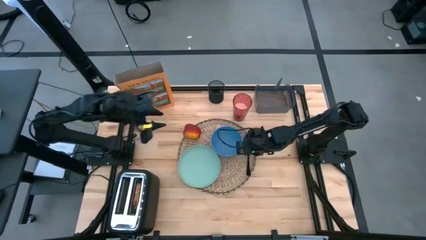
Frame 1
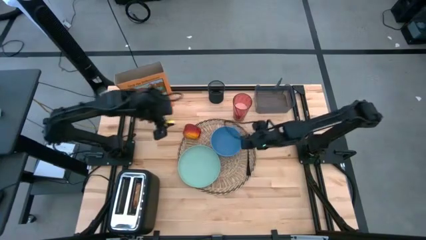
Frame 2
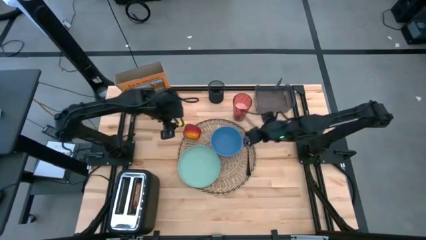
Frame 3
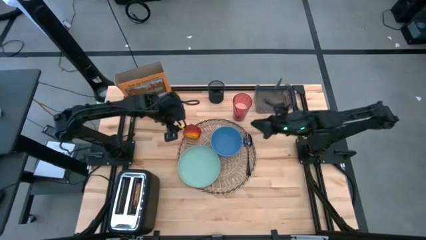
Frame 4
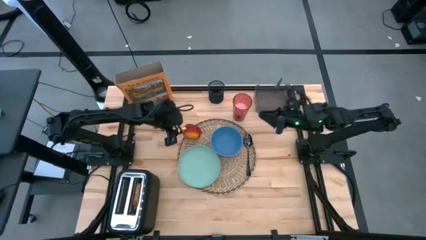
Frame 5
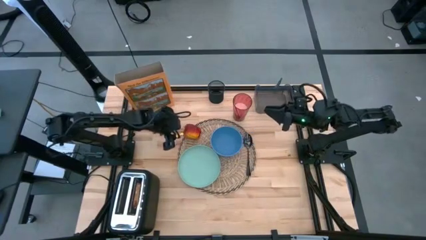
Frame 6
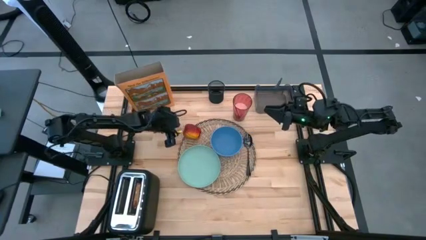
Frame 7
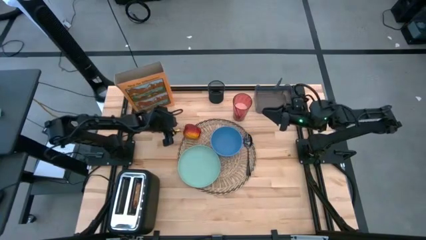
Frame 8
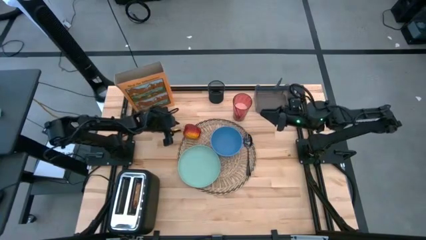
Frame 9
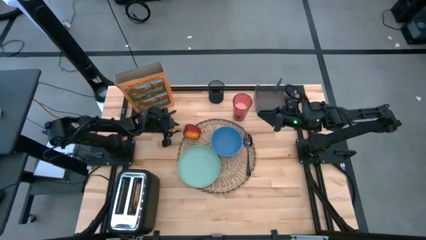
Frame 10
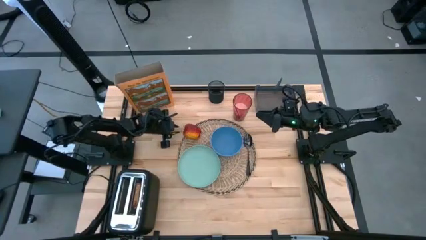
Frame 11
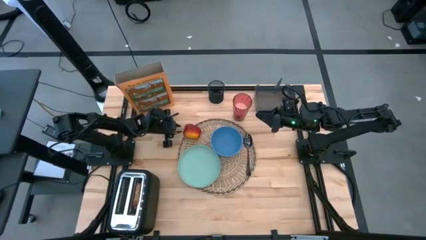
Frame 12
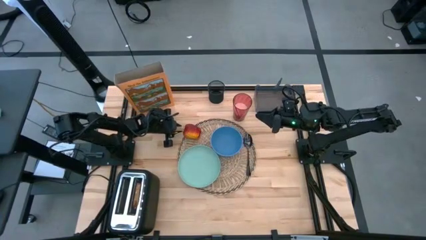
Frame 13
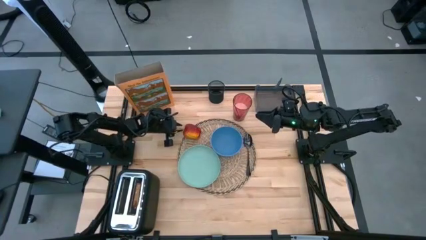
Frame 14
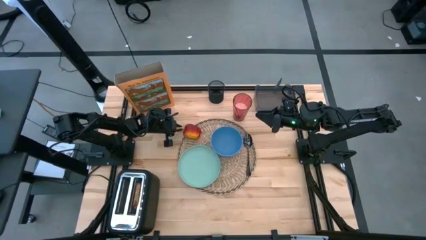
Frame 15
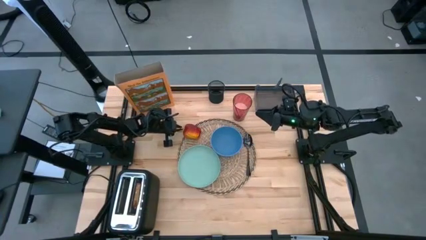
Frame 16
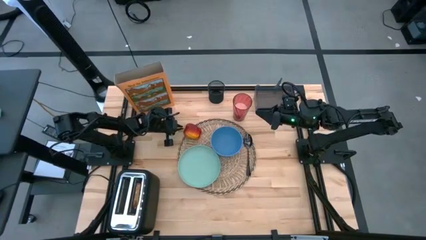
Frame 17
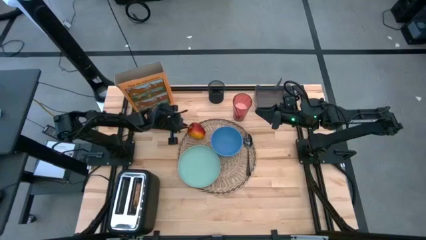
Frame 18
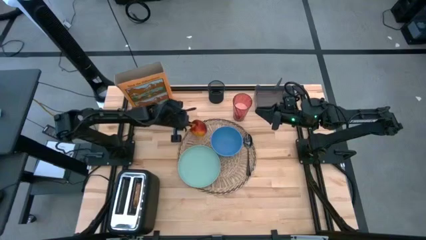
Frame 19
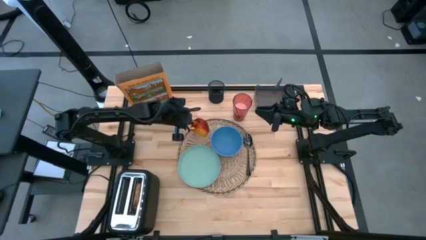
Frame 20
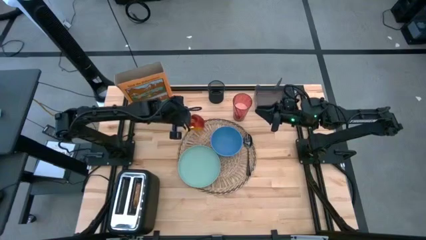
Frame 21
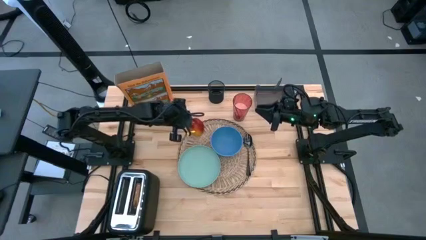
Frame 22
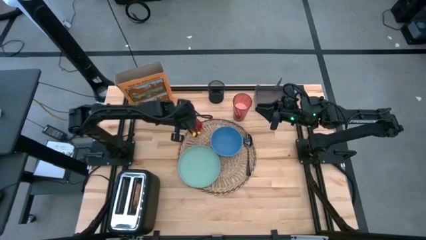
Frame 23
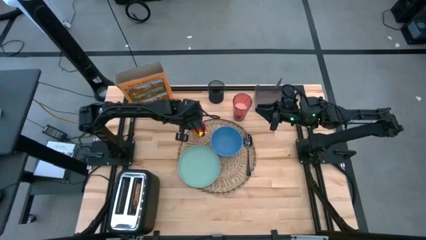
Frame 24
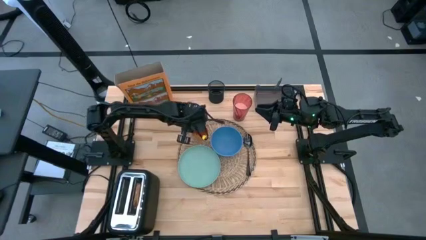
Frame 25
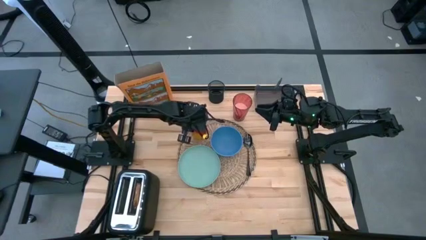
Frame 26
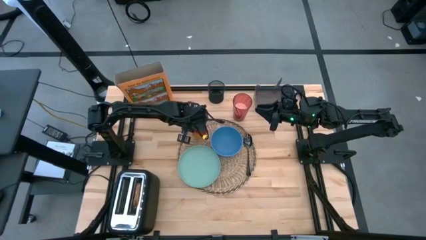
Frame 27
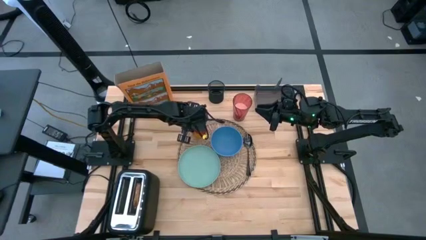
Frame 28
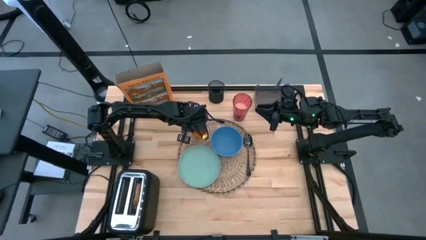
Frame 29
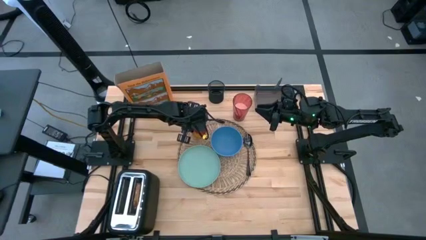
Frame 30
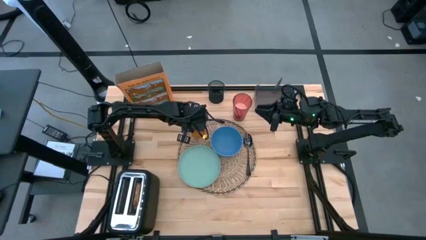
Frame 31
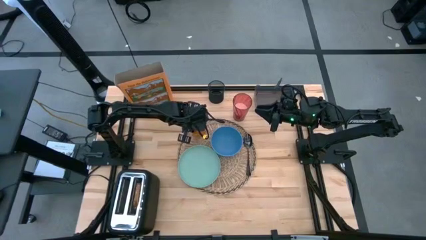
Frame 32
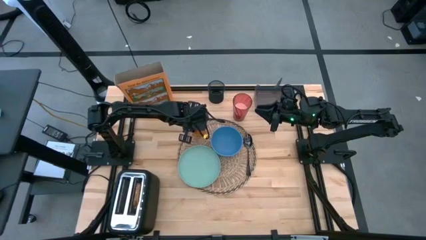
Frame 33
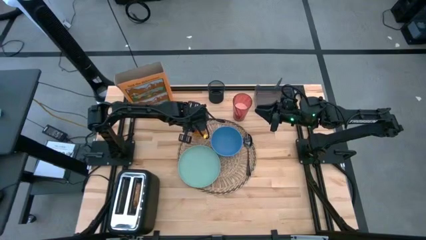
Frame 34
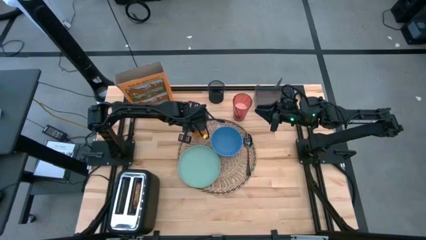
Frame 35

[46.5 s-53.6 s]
Task: Arrange a breakfast setting
Adjust the red apple on the brown table mat

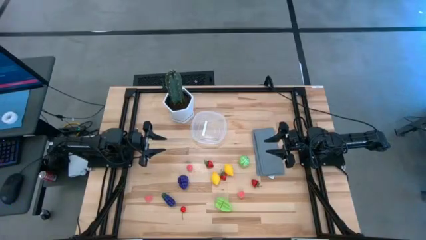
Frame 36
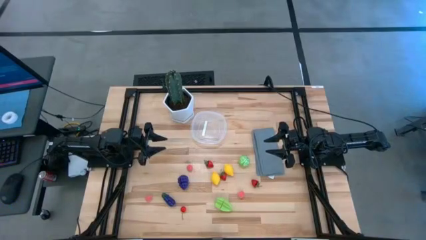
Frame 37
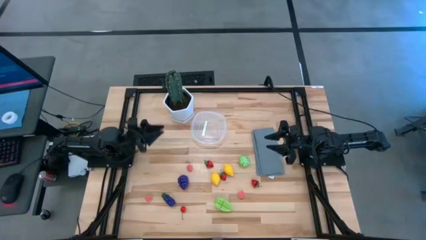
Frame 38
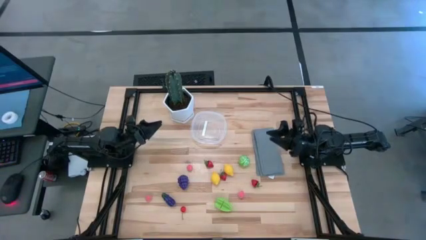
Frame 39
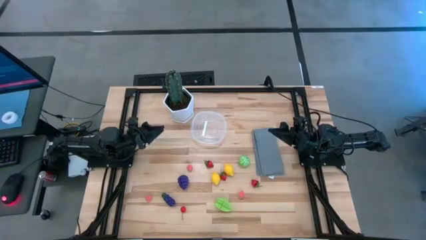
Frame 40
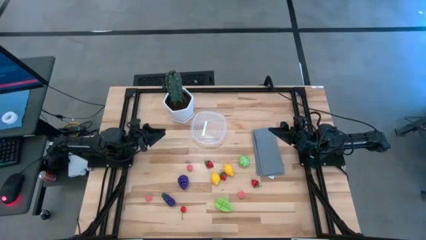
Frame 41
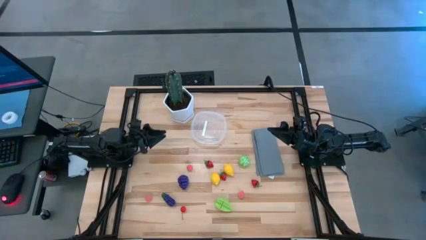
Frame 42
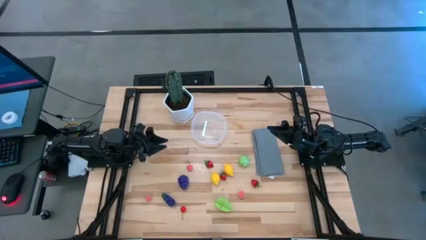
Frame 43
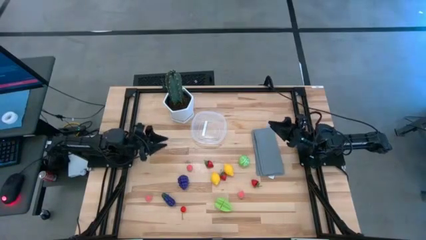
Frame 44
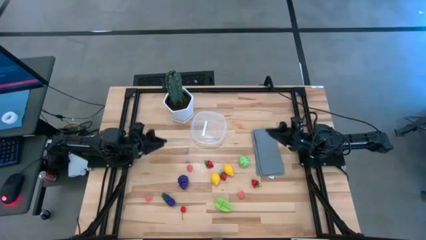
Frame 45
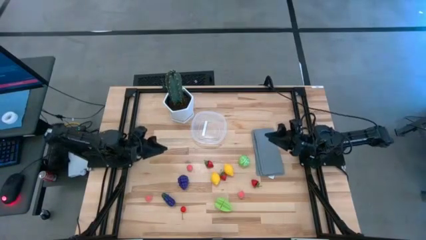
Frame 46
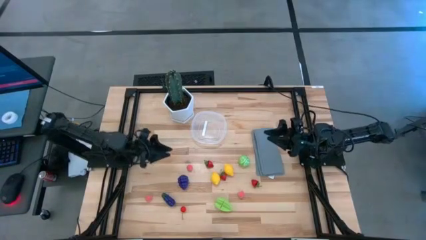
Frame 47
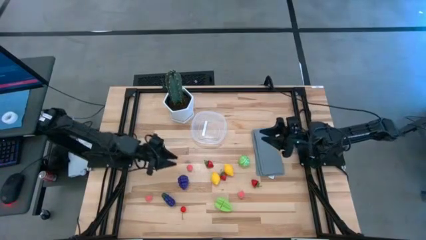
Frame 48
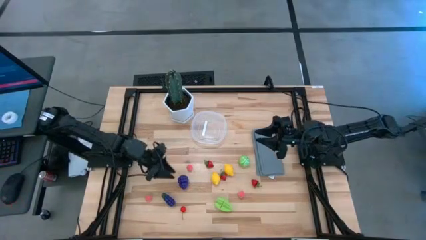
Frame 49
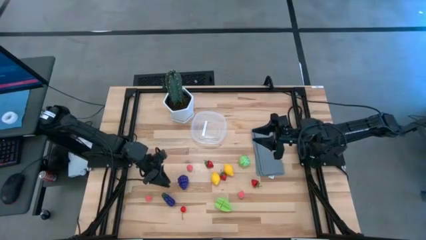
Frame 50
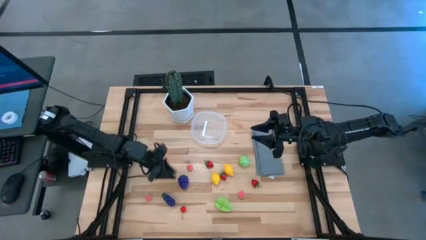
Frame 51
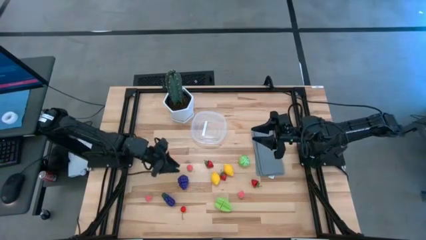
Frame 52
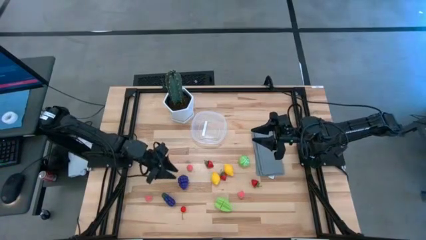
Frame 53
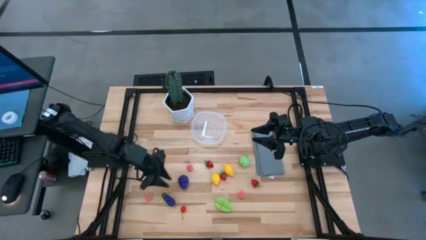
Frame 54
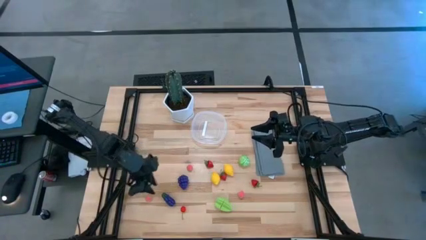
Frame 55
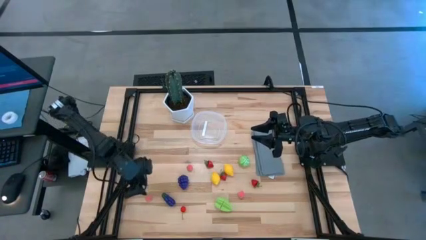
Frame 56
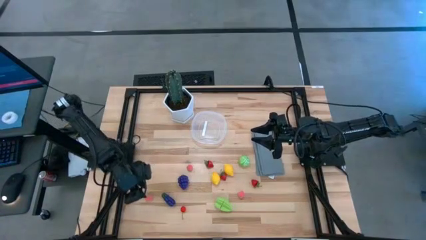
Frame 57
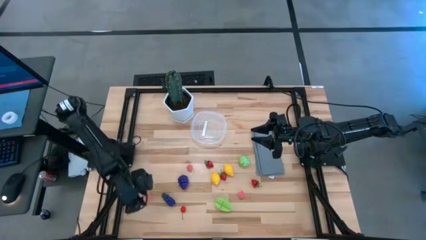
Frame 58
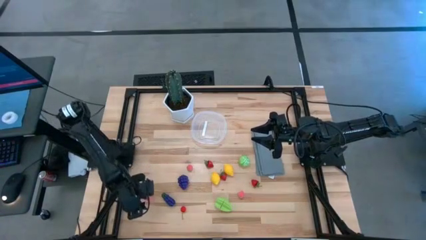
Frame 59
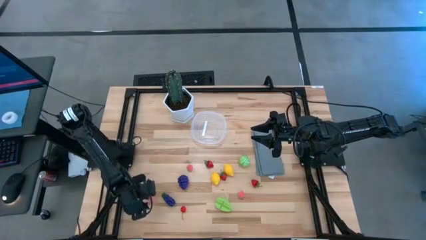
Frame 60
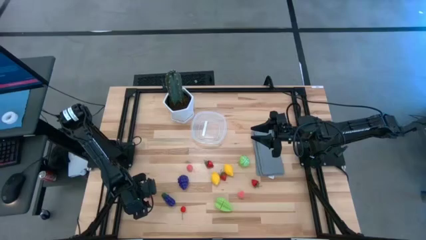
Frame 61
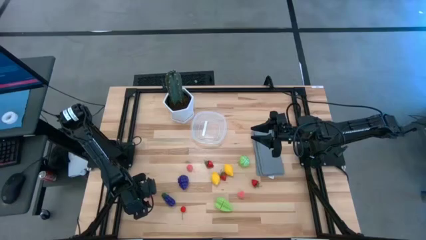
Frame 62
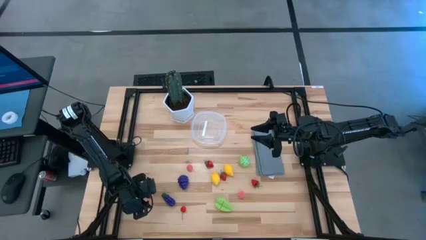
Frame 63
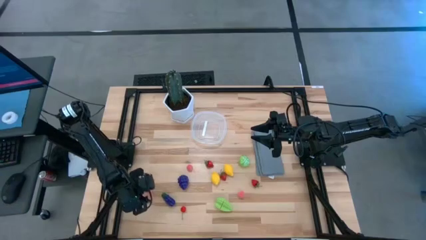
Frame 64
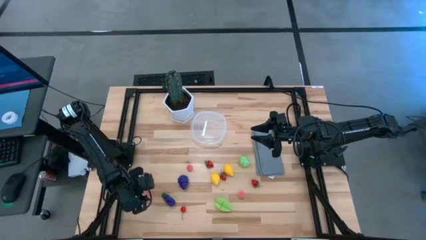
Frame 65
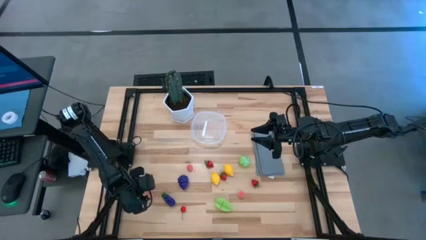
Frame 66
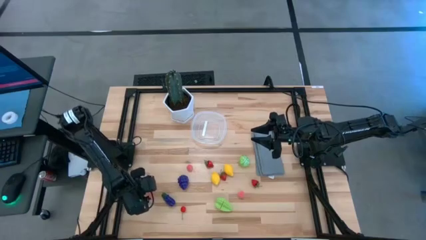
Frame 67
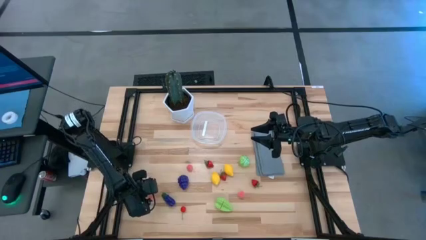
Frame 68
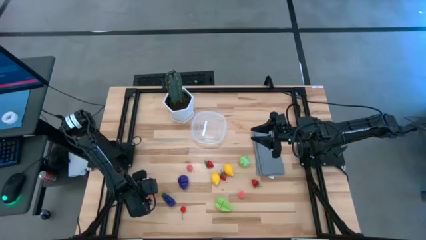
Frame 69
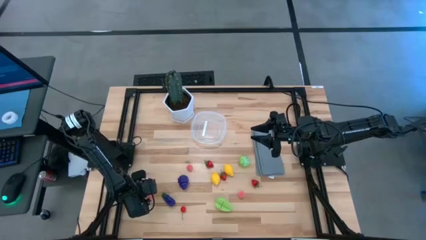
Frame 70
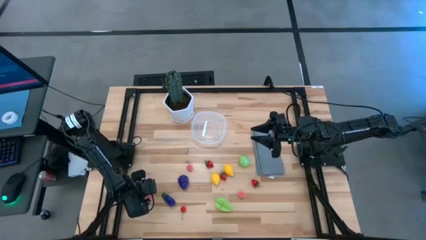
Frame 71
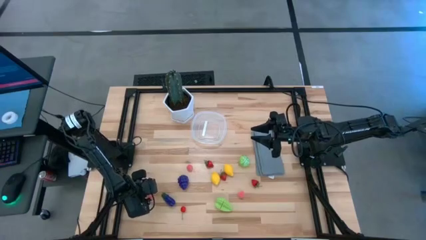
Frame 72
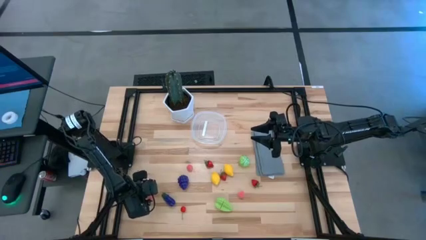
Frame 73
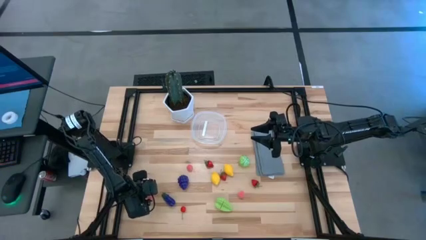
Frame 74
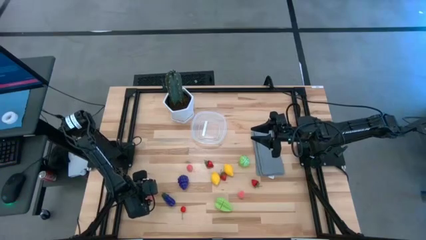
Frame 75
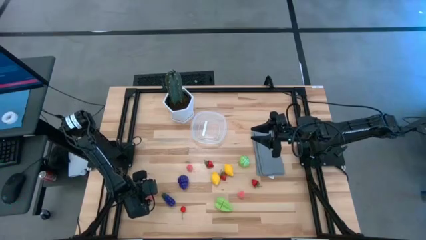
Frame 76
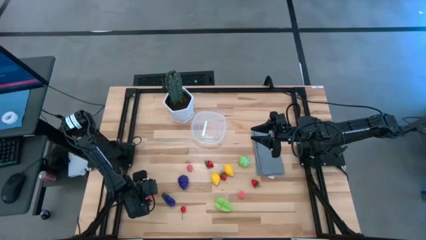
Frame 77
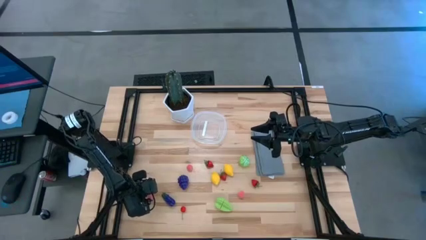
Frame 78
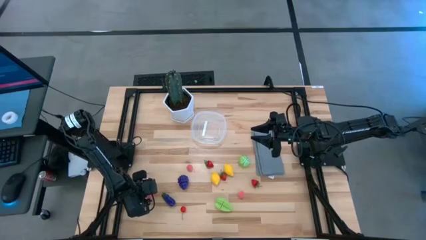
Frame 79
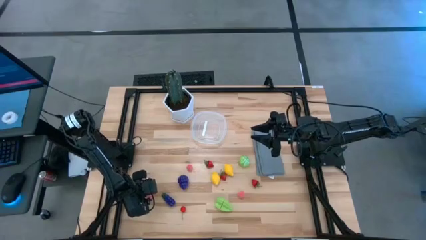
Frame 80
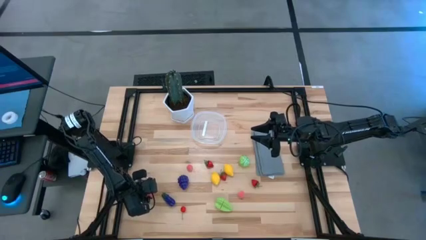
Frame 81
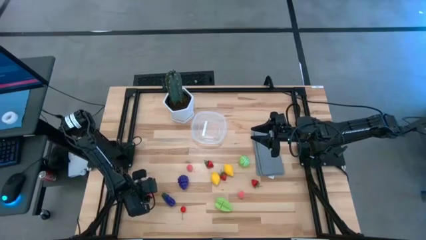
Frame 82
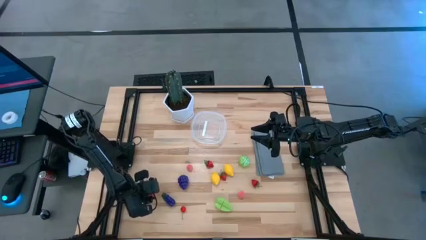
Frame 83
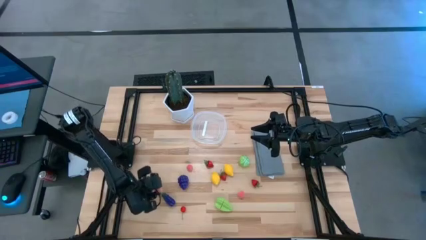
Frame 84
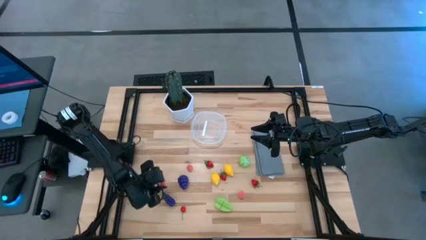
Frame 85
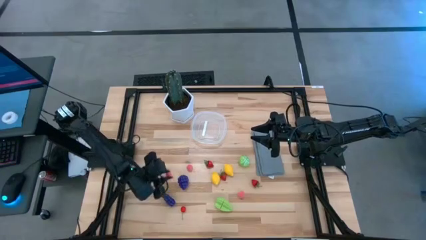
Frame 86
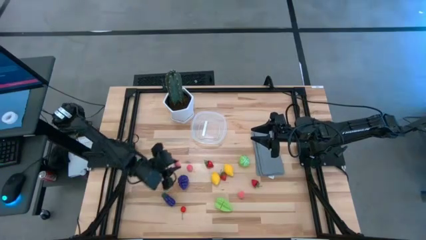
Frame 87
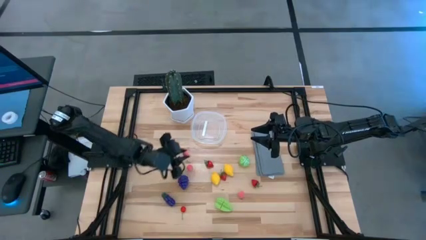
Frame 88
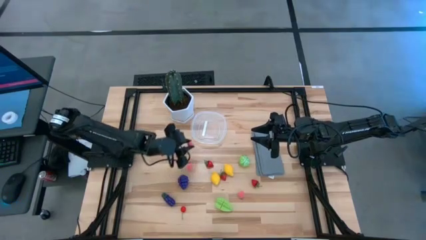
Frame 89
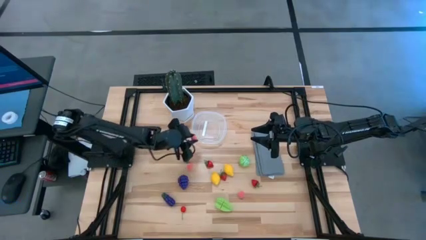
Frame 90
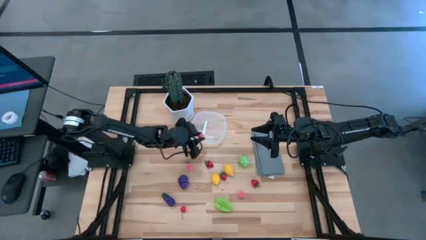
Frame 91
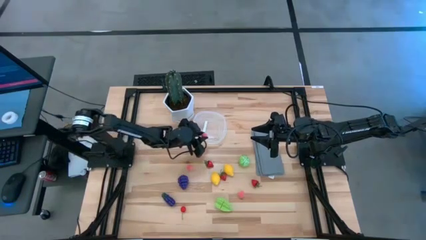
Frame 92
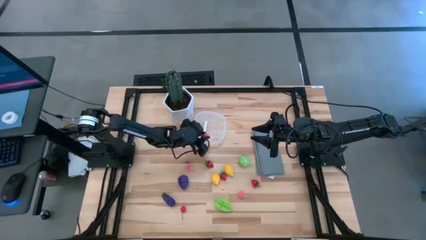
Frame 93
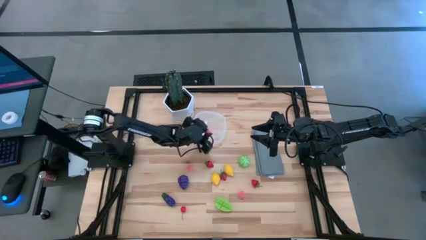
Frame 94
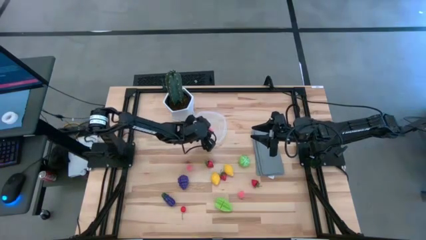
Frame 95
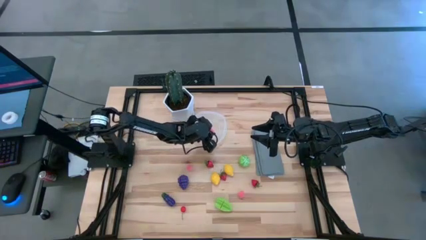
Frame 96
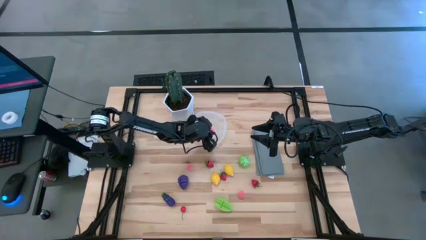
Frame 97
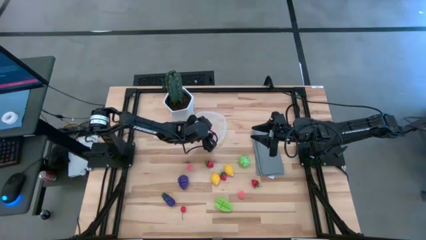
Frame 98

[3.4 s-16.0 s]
Task: Pick and placing Produce into tupperware
Put the left peach into the transparent bin
